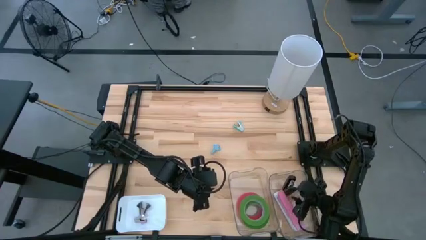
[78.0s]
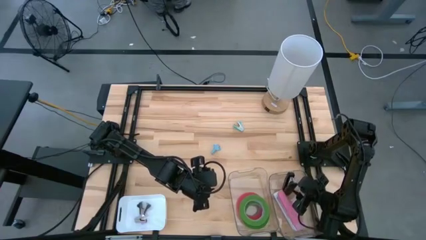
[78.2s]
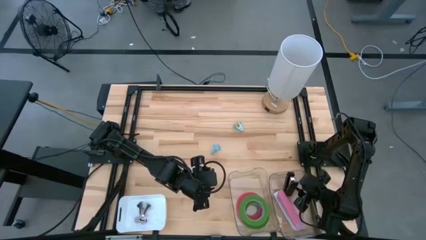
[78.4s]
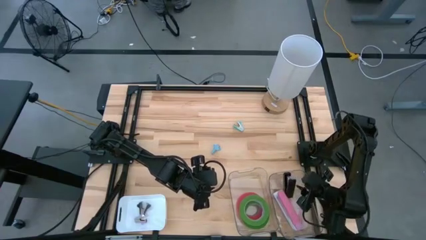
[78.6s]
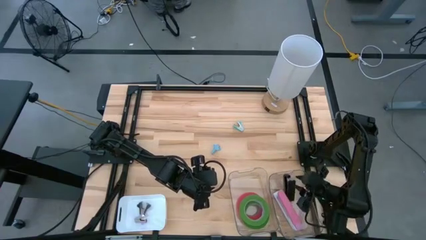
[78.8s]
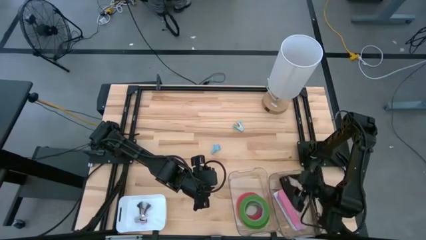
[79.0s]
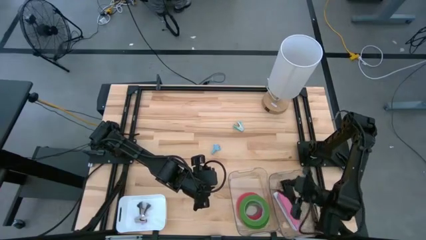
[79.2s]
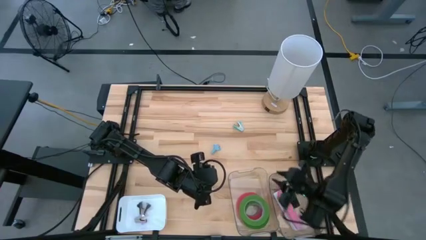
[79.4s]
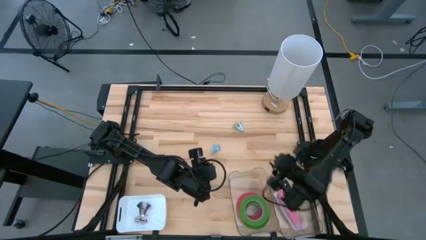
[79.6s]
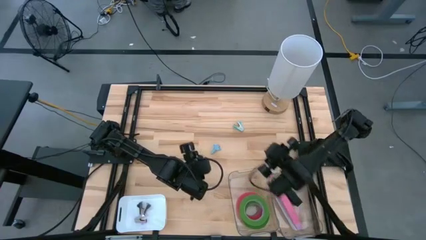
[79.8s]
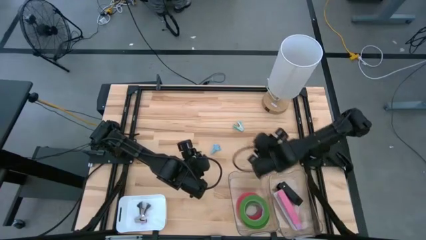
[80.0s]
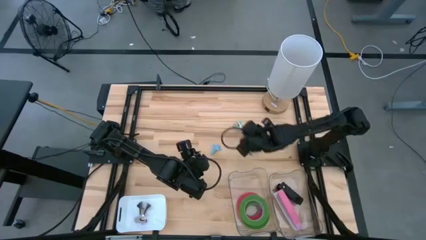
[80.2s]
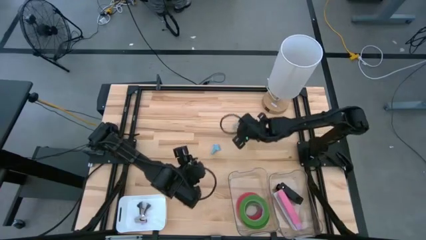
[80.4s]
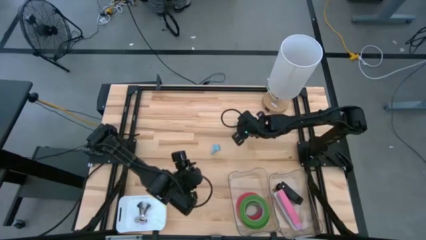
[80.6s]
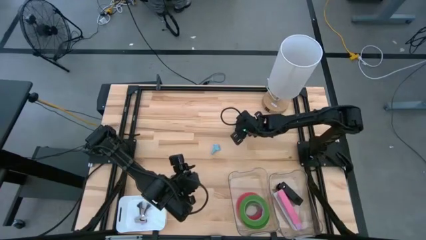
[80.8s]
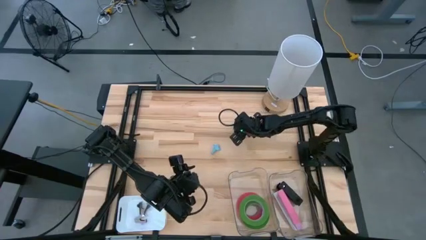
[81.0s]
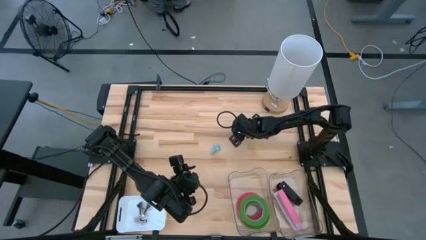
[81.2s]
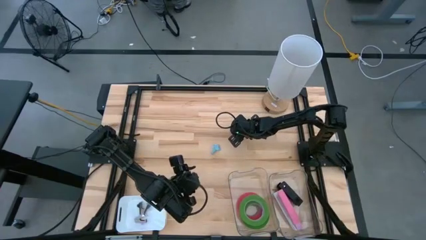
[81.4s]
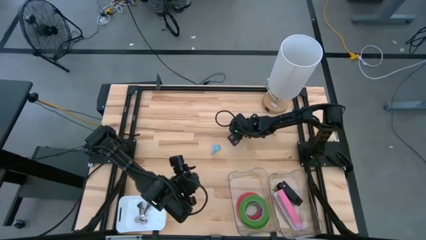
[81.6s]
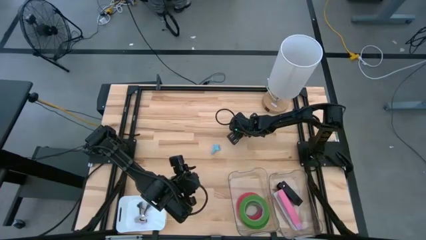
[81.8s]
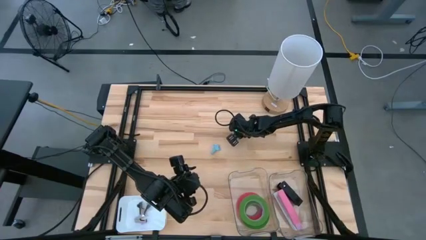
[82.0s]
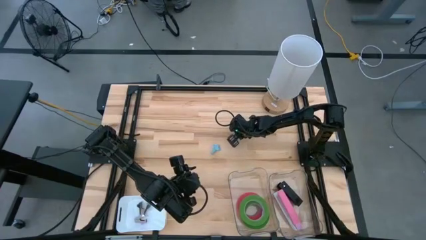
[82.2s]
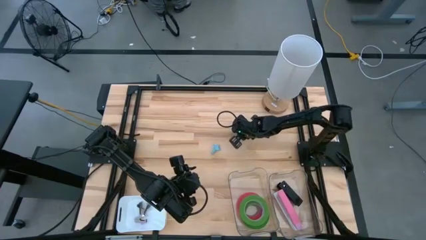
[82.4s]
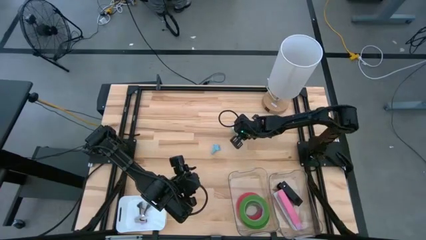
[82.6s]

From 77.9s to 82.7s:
Task: Pick and place Stapler, Stapler remover, tape
Put the blue staple remover into the white bin

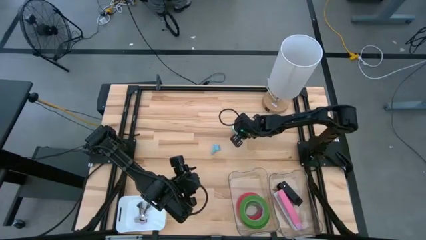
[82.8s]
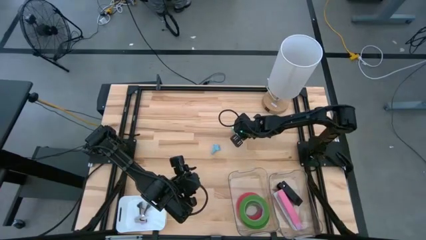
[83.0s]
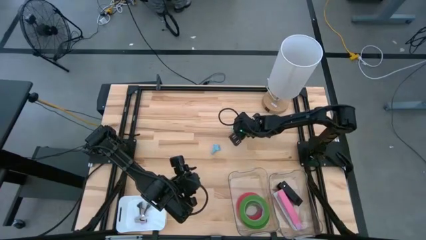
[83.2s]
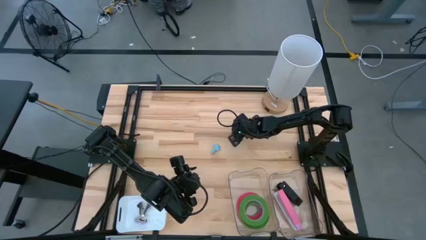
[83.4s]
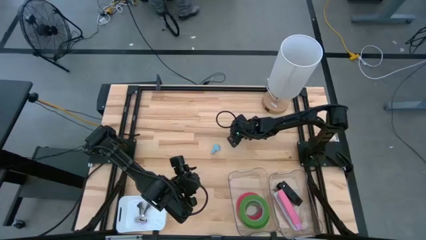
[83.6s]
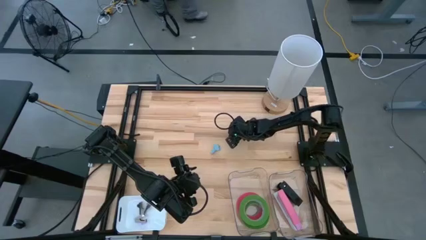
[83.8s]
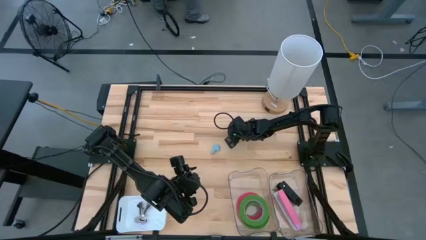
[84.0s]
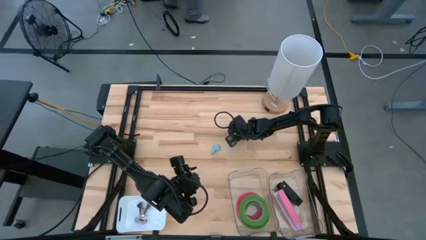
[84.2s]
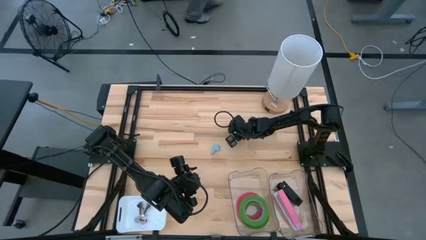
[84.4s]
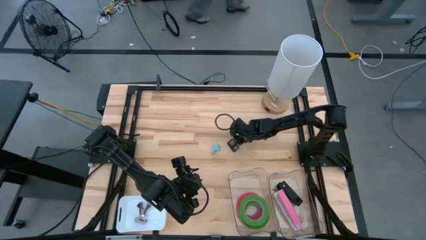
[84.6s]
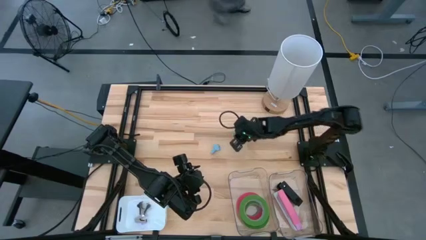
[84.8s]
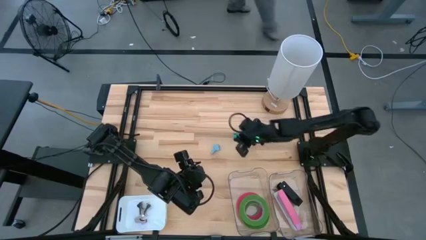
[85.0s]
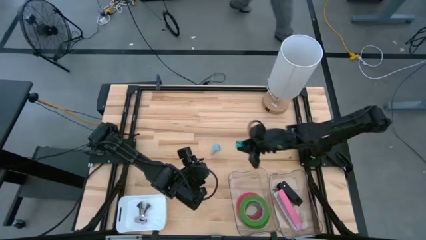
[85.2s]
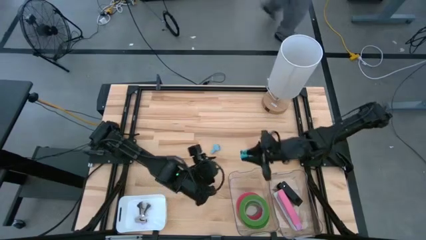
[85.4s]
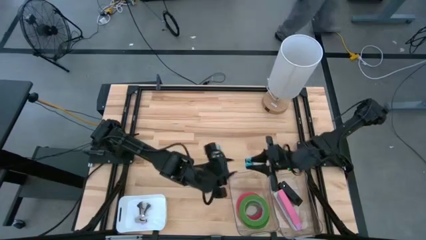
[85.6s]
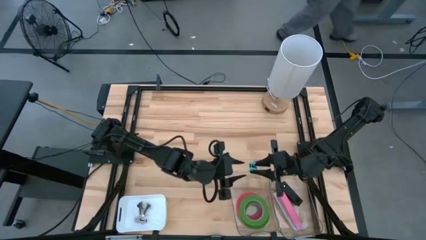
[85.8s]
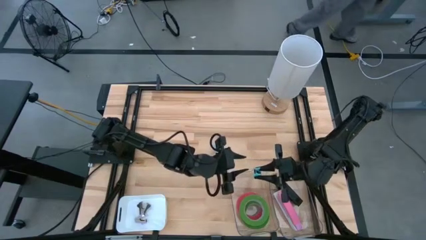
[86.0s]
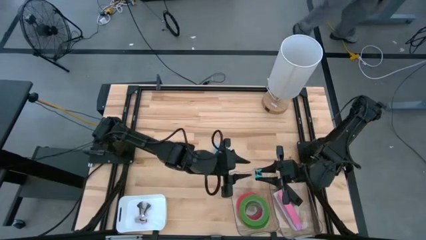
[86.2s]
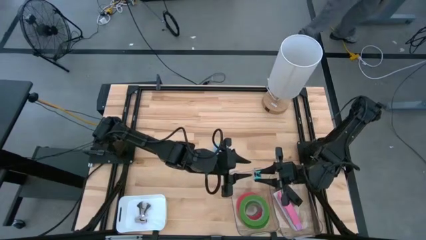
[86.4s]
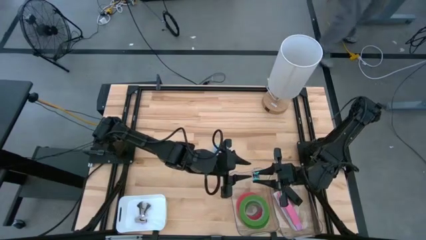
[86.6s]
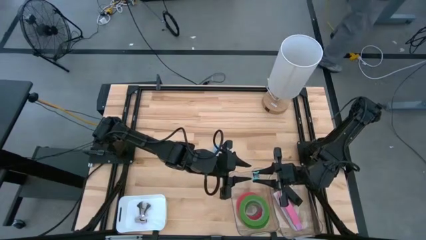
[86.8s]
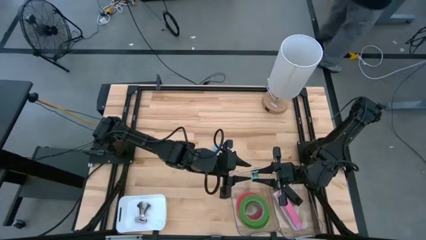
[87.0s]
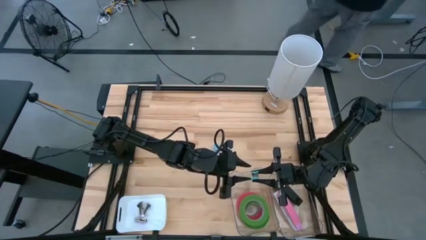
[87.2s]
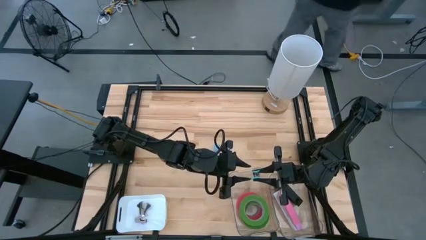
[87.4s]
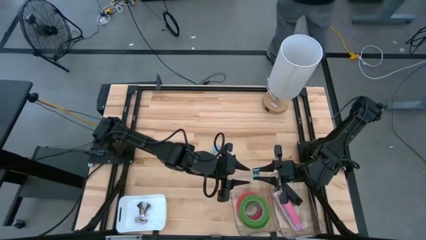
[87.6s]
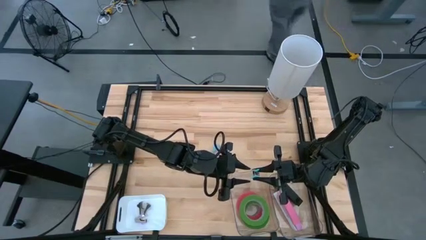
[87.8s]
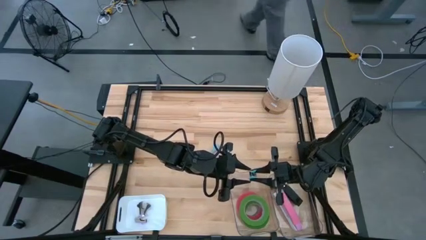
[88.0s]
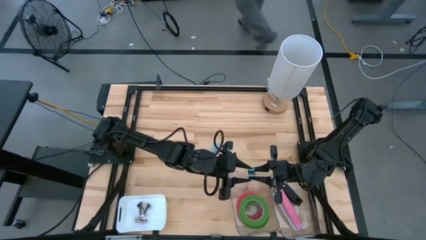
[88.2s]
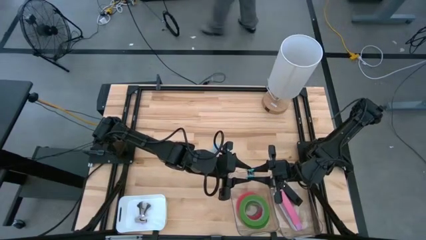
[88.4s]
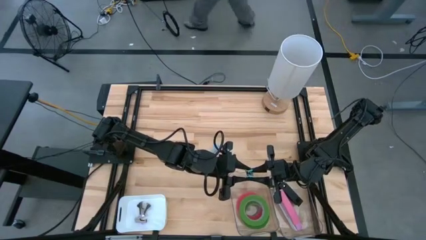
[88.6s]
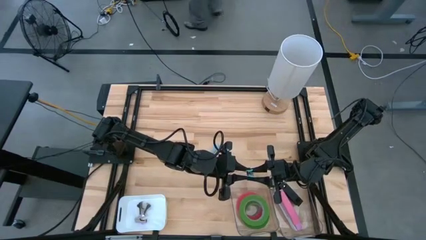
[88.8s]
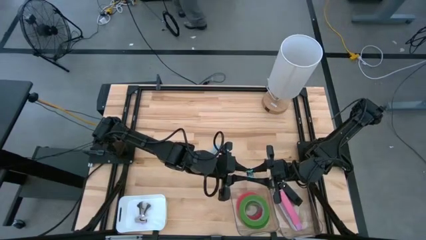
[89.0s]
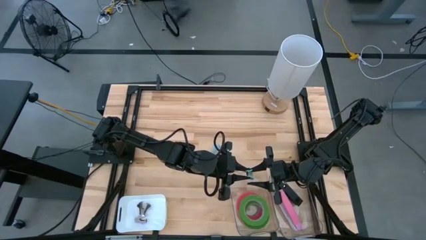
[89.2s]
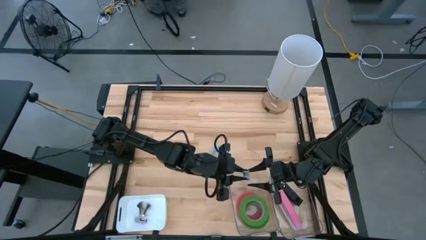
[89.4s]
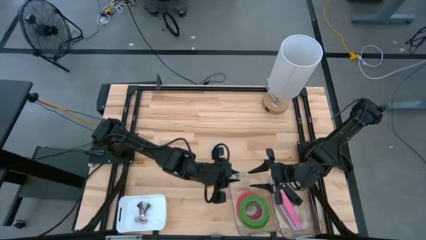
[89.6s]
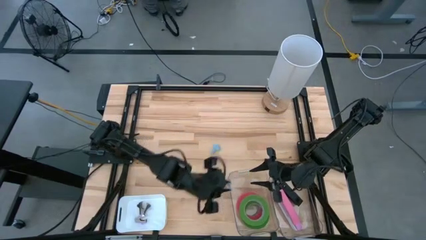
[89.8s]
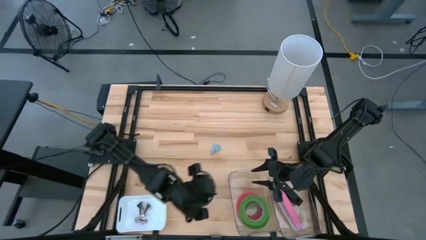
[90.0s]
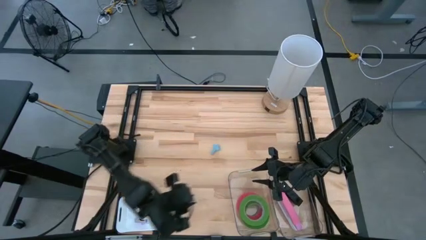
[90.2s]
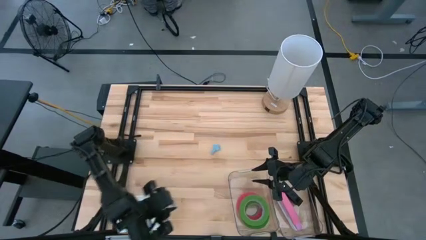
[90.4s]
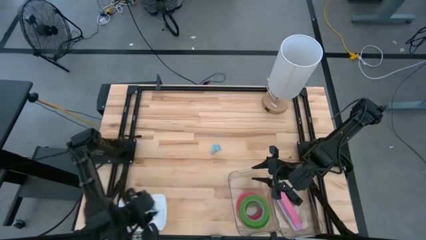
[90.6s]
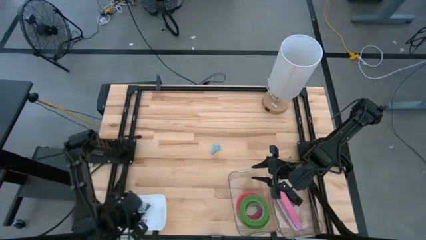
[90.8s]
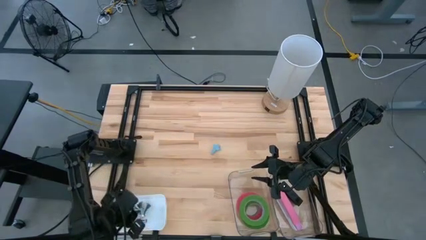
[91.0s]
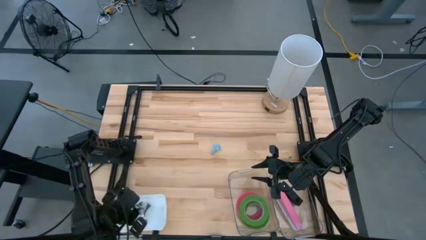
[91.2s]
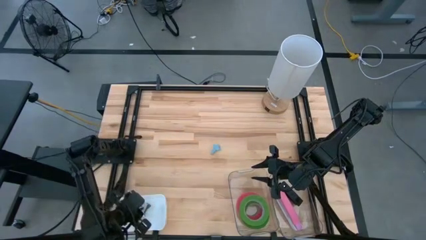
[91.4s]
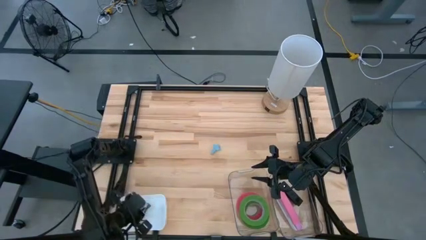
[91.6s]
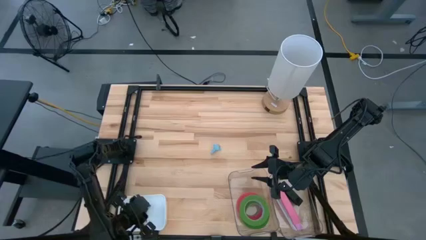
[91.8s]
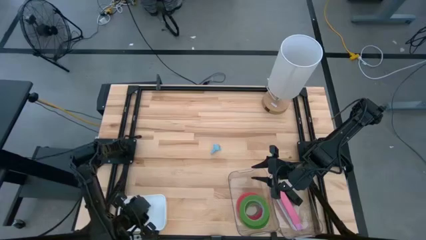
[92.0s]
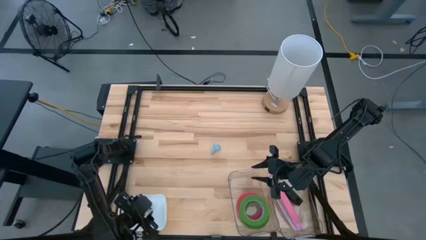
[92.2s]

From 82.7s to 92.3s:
Put the blue staple remover into the white bin
